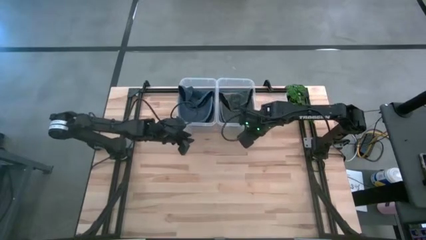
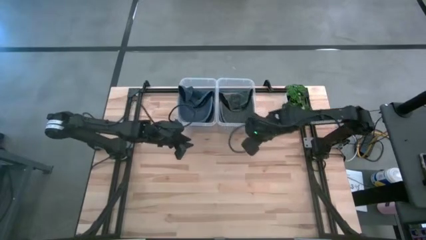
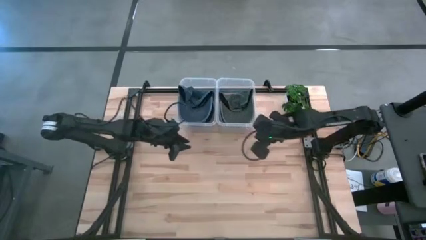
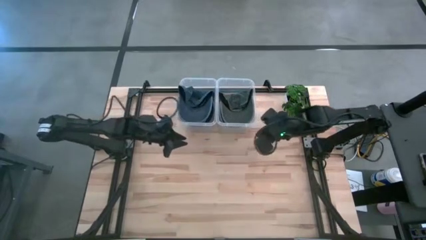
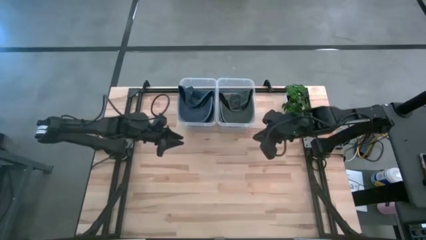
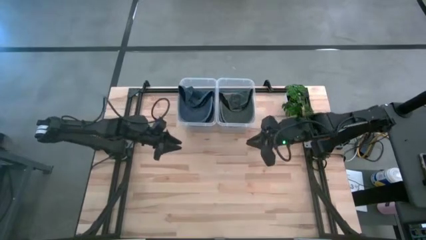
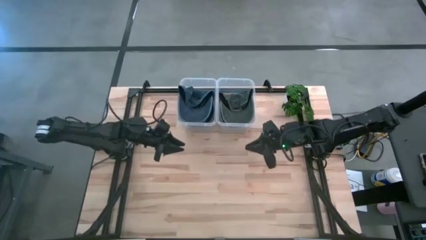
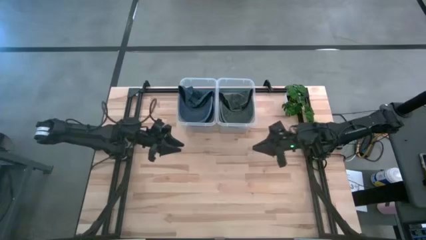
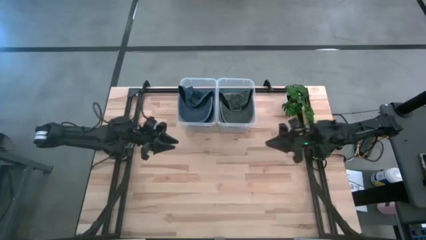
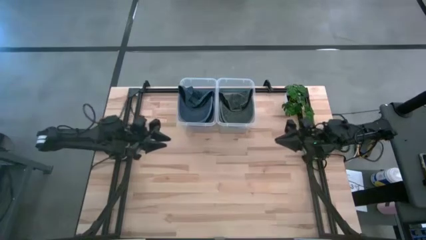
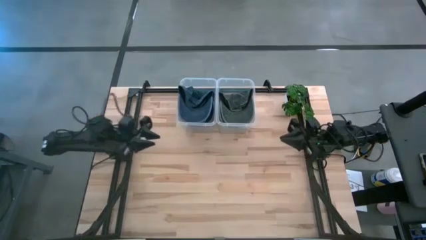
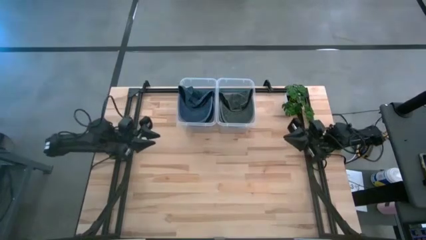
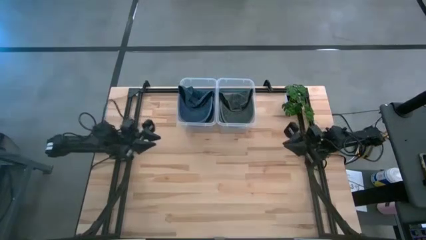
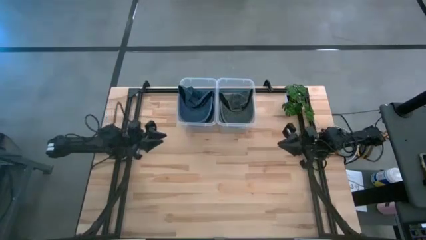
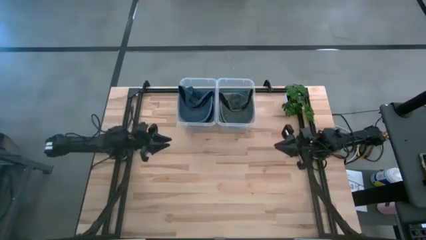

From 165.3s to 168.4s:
Task: Pick & Place hat
Return to Home Position

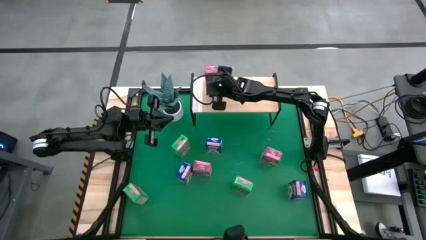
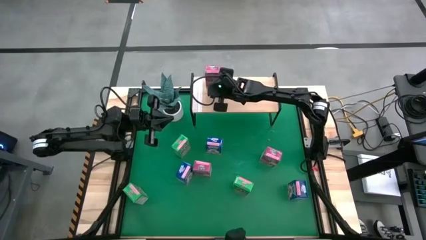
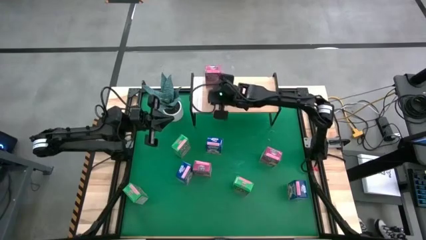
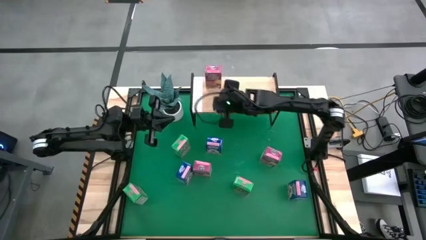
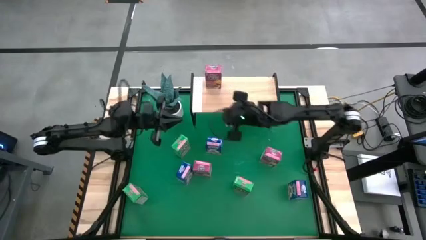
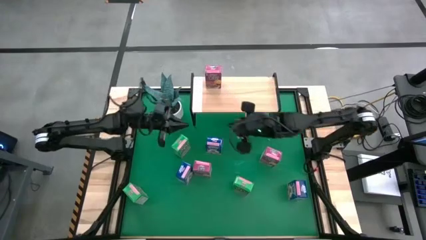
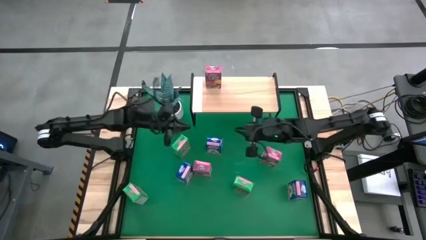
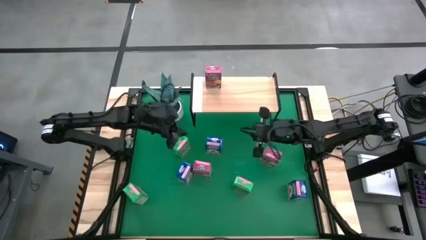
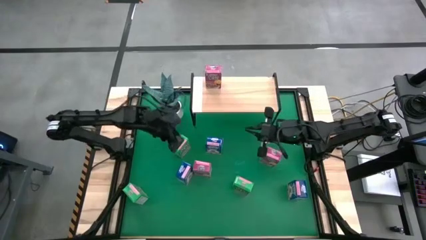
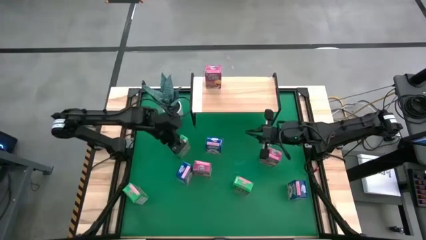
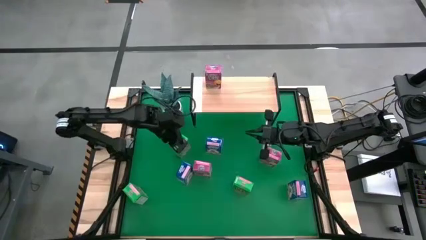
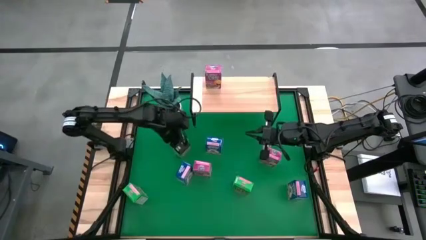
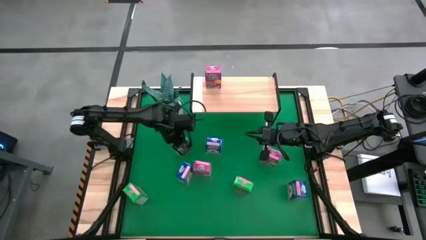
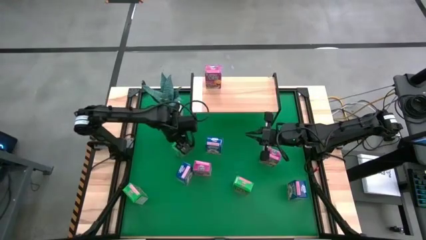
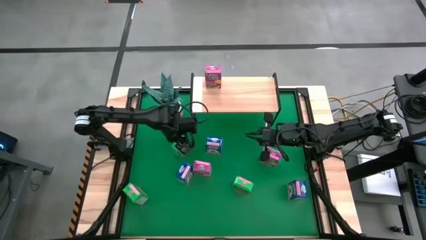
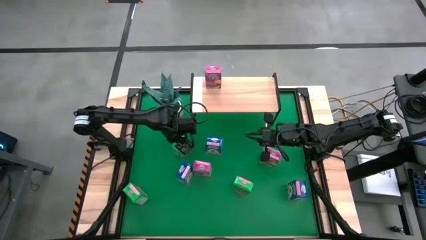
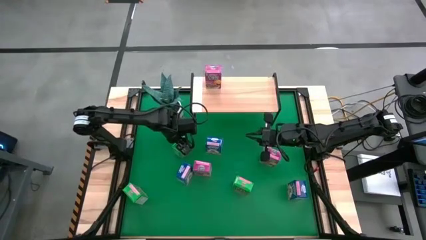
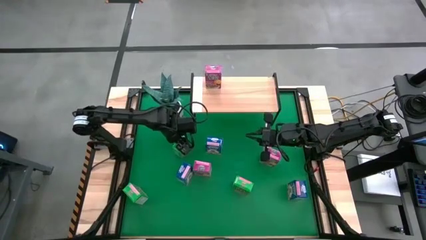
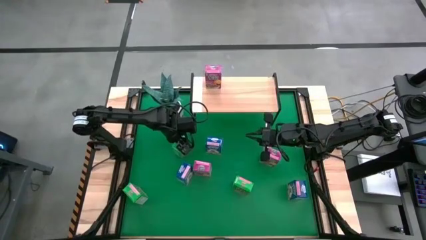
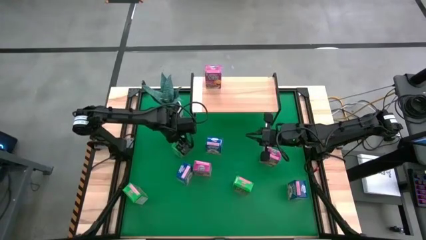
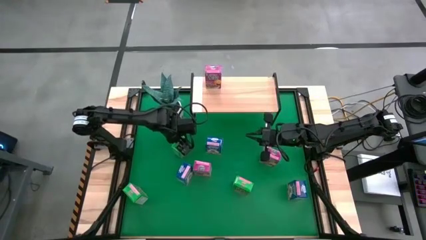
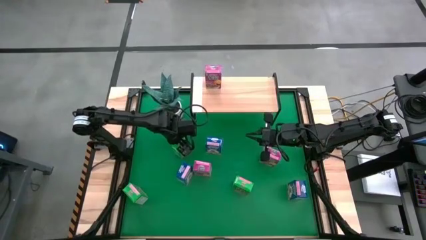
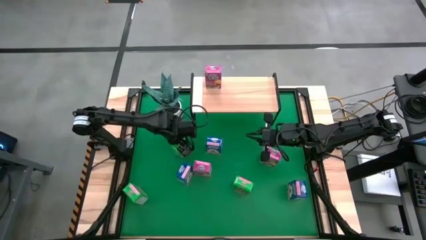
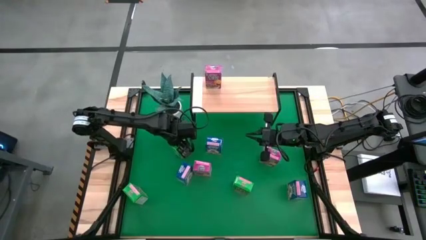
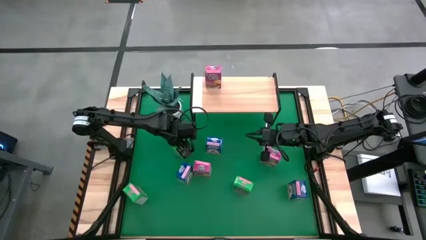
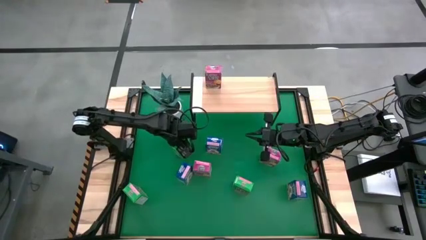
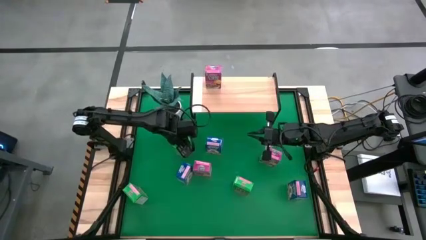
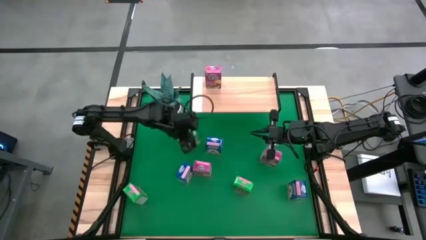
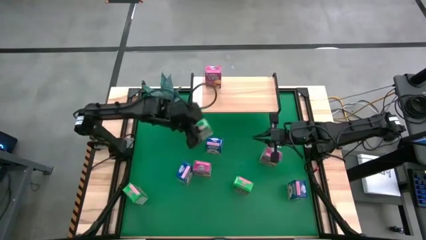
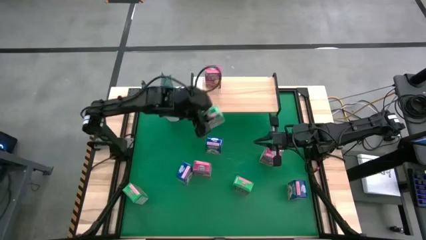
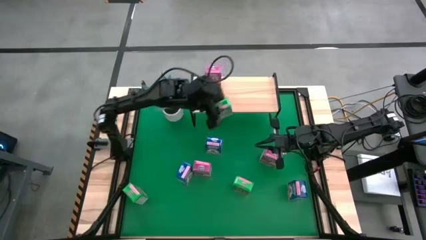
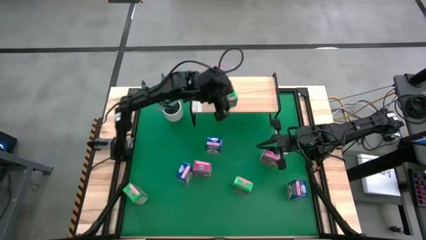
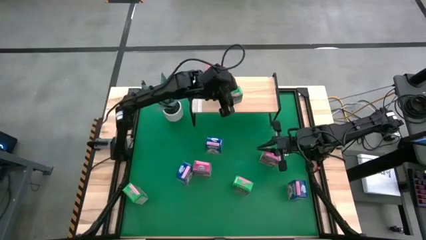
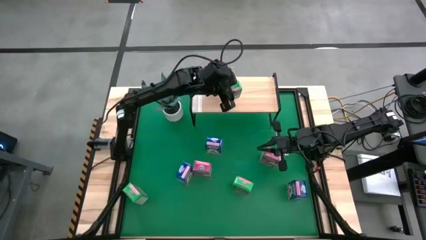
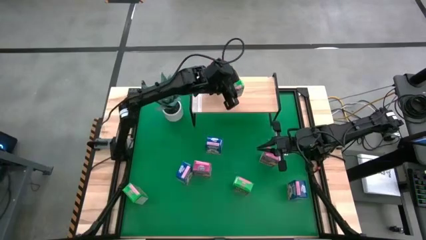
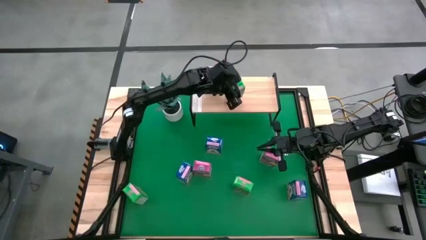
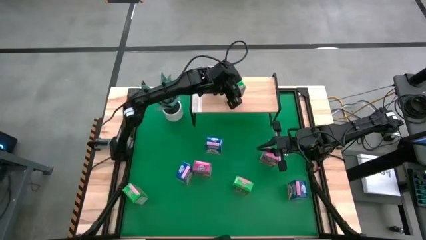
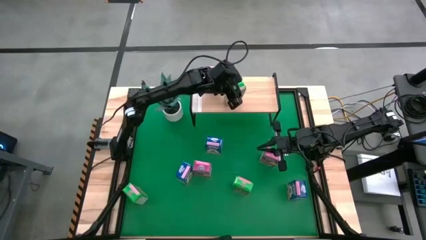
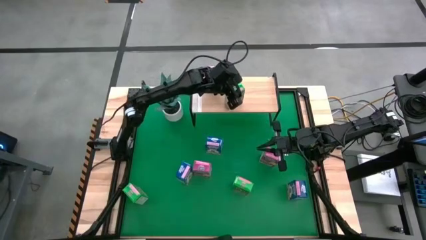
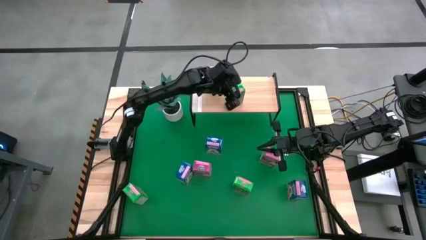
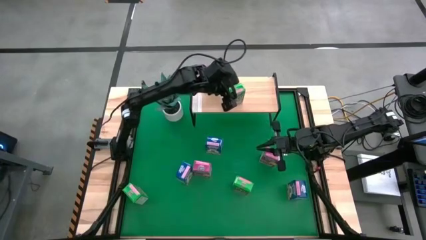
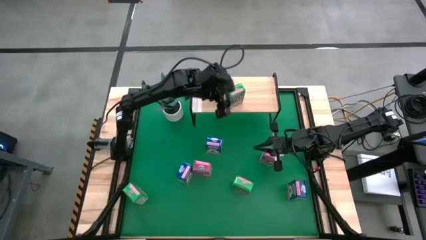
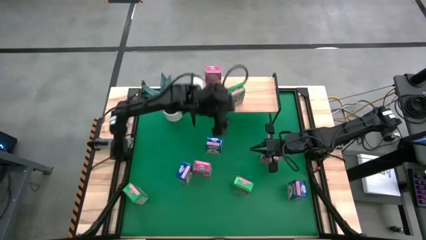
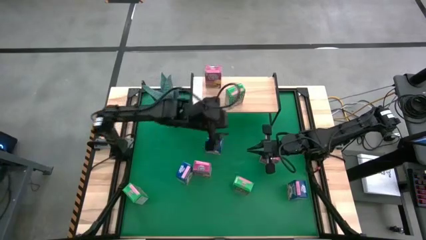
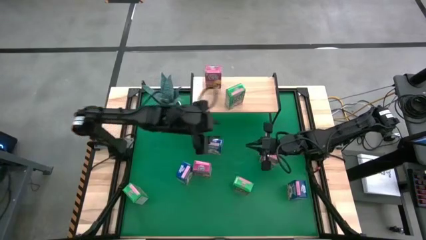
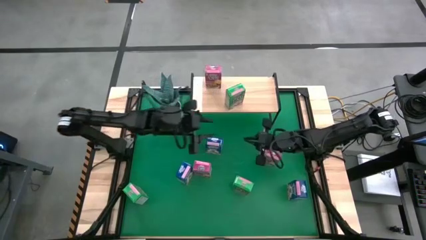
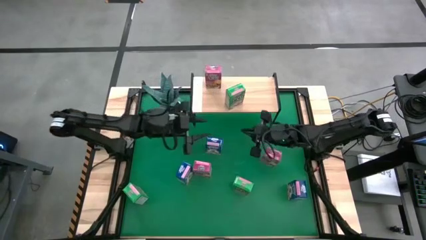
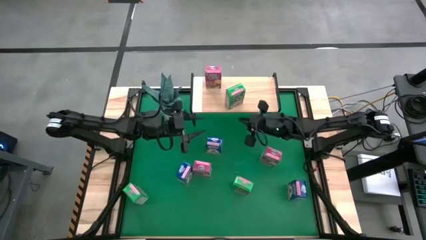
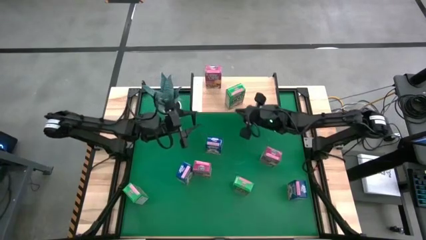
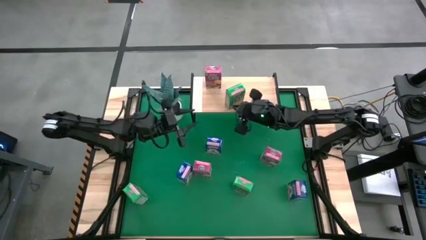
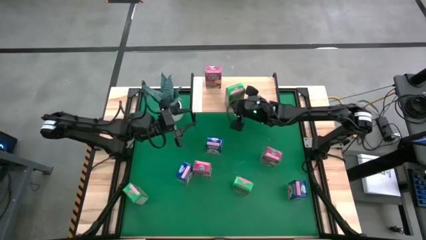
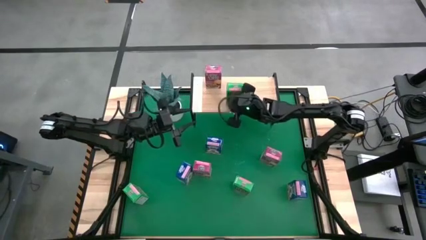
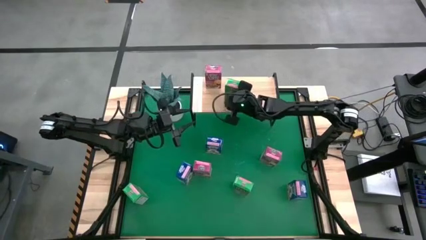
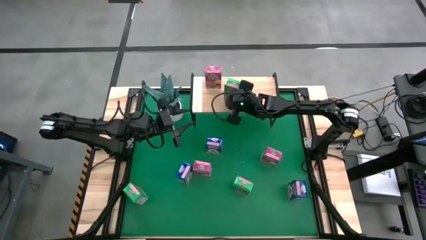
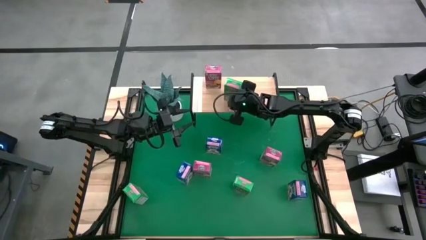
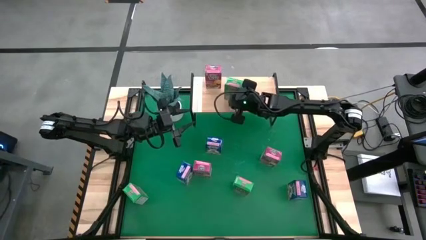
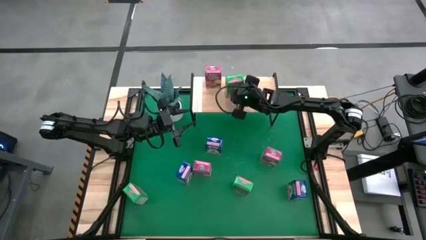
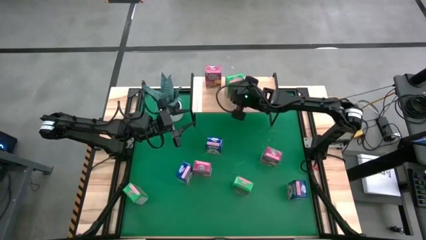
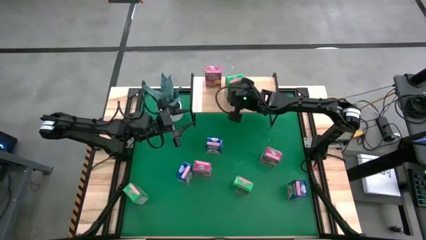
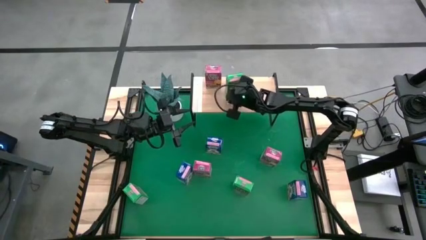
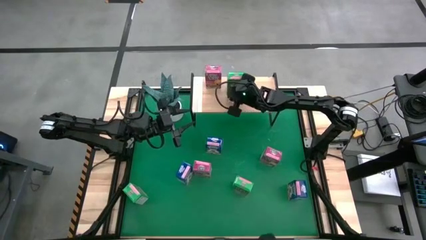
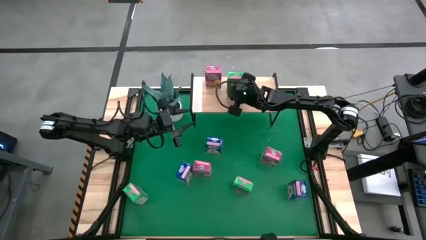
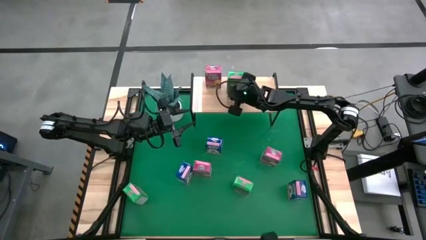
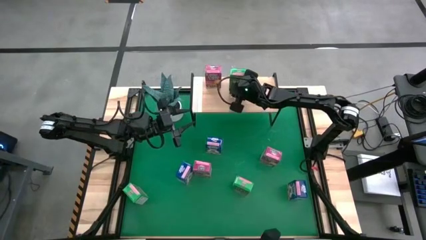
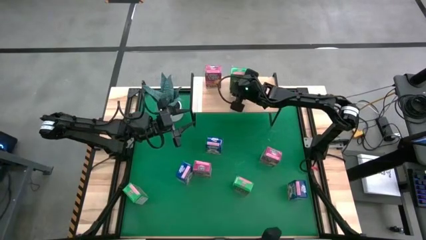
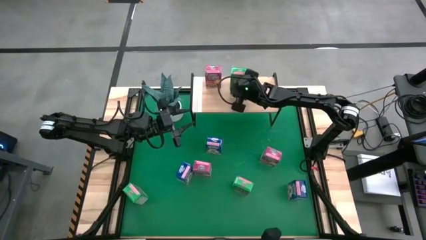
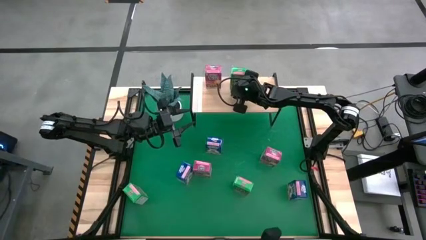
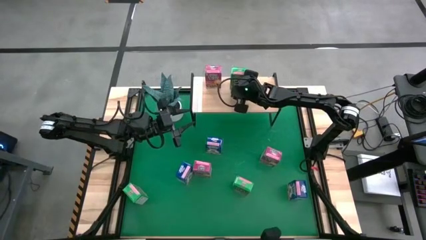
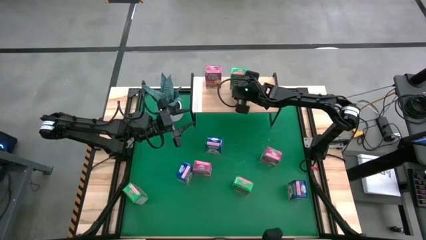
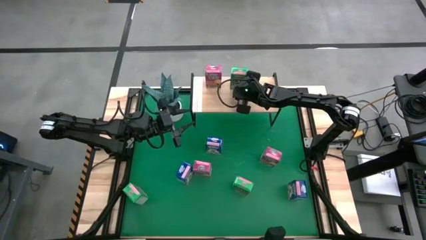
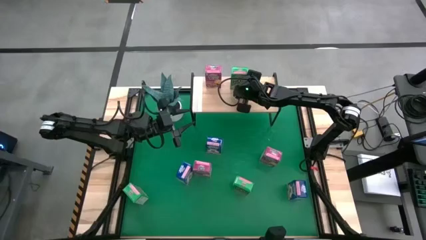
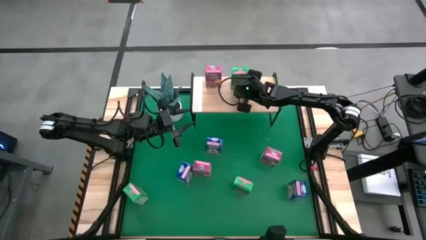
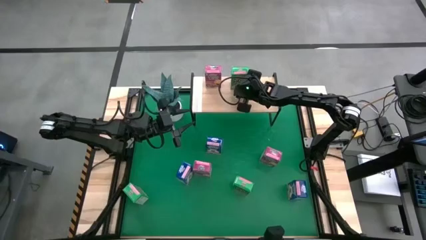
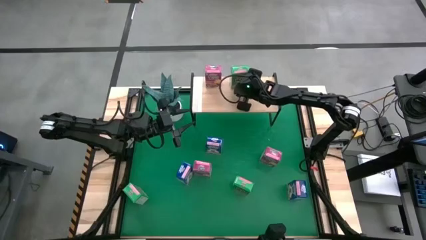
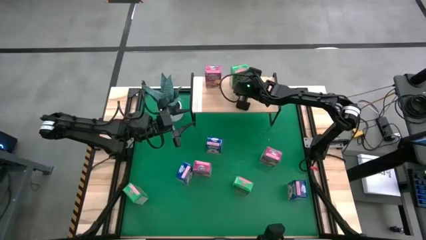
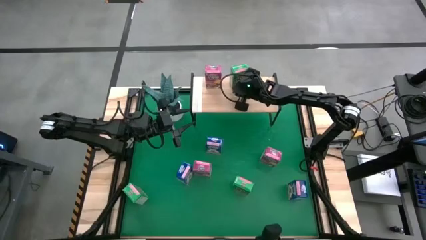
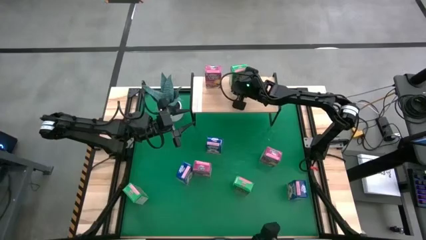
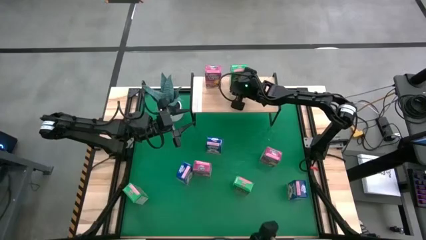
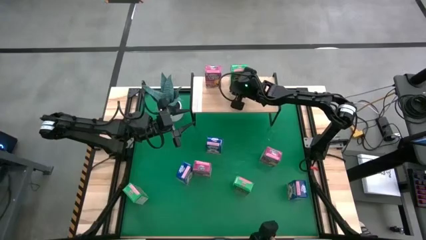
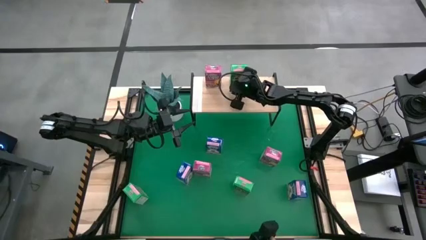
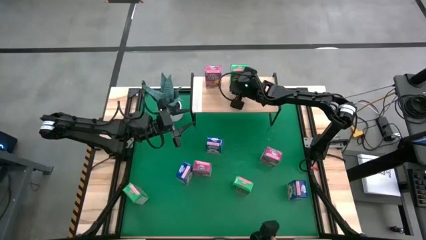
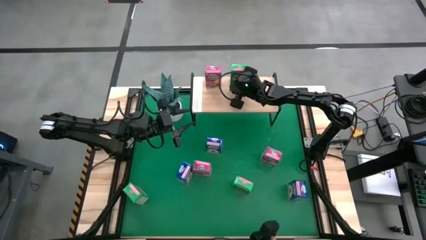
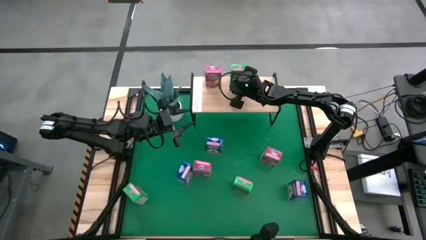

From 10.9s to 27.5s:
Task: Stack cereal on shelf
Put the top green cereal box on the shelf
